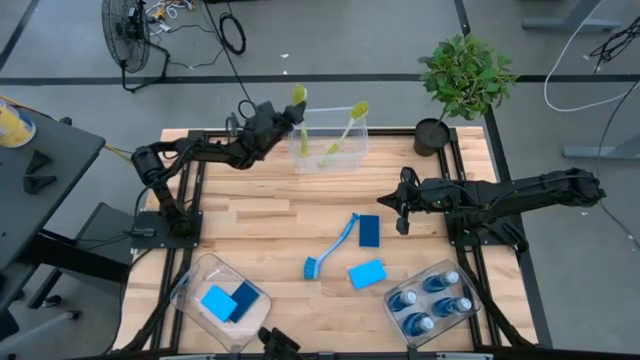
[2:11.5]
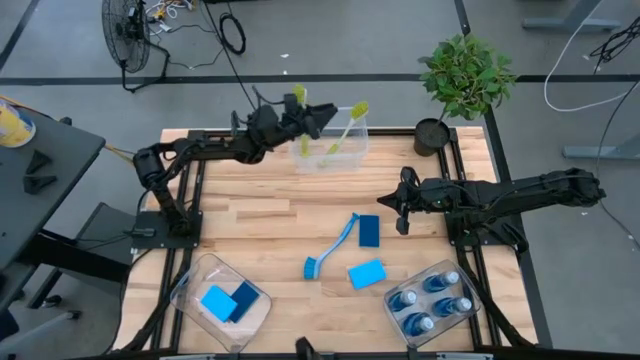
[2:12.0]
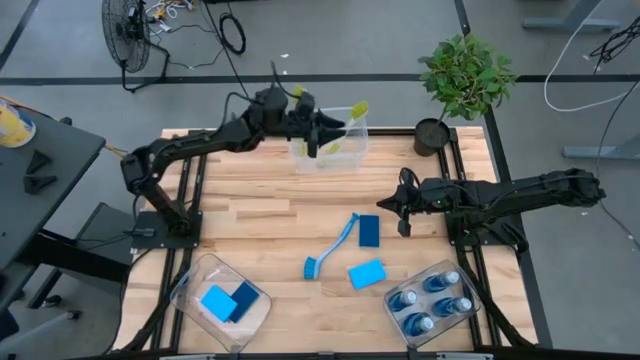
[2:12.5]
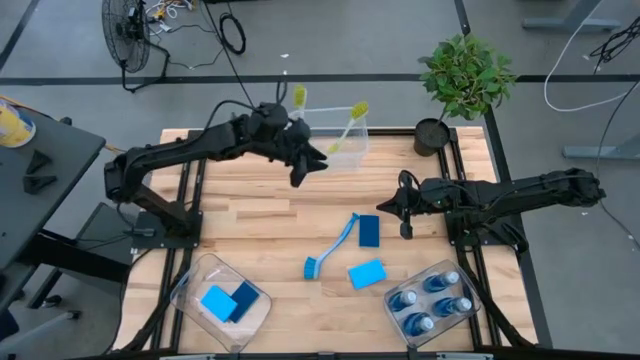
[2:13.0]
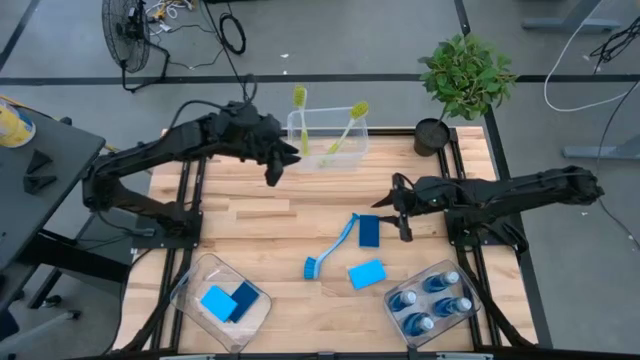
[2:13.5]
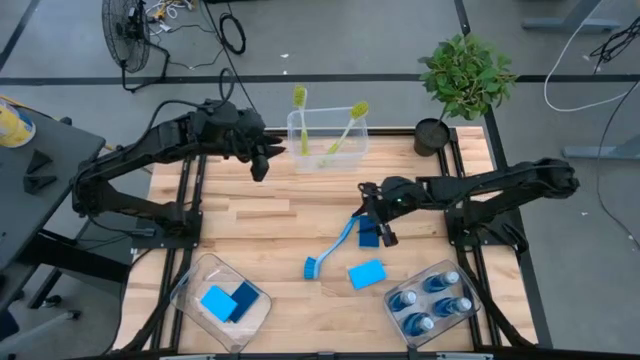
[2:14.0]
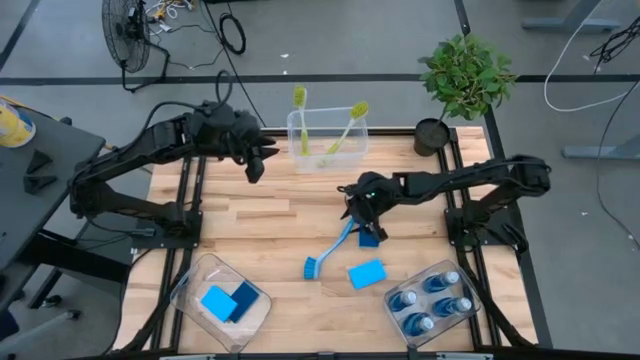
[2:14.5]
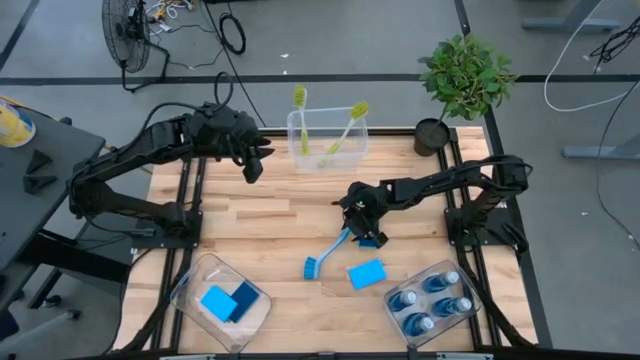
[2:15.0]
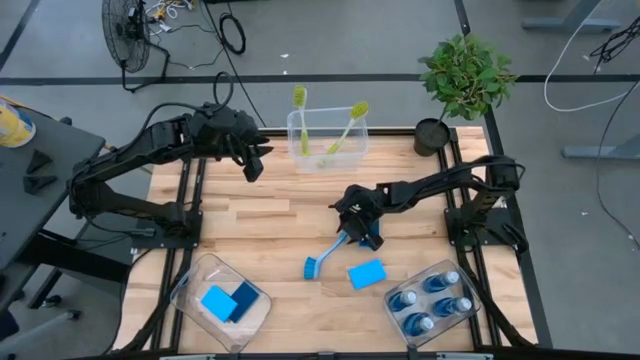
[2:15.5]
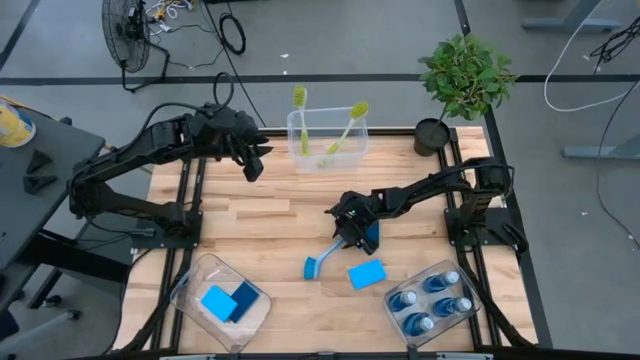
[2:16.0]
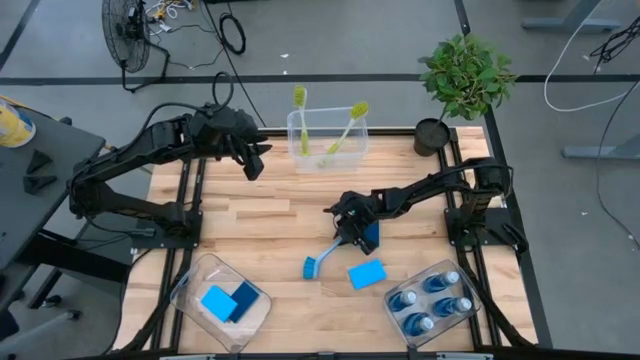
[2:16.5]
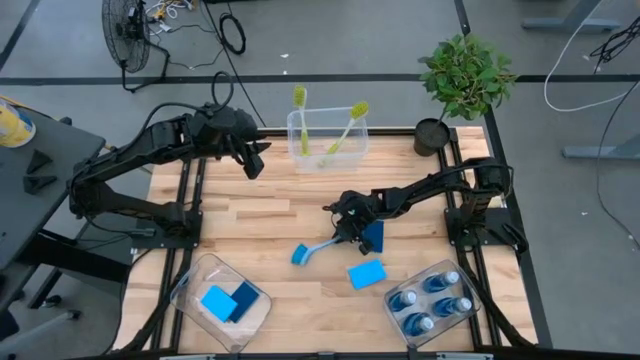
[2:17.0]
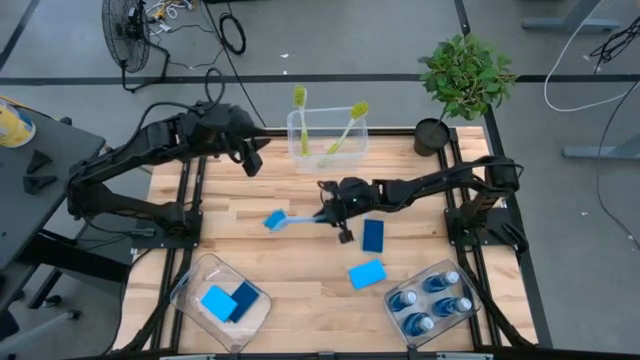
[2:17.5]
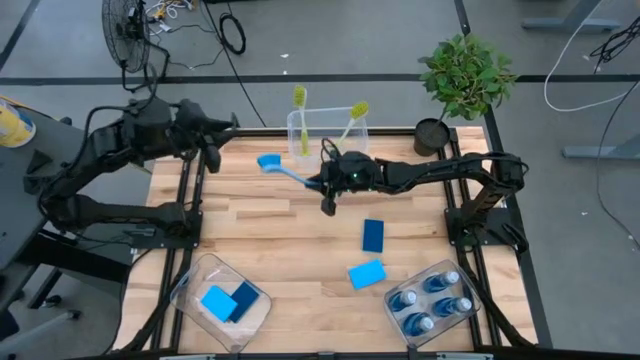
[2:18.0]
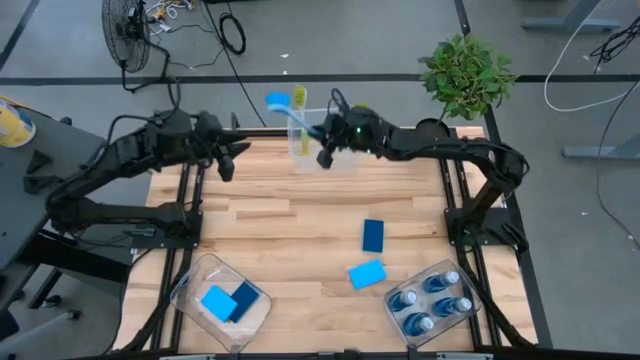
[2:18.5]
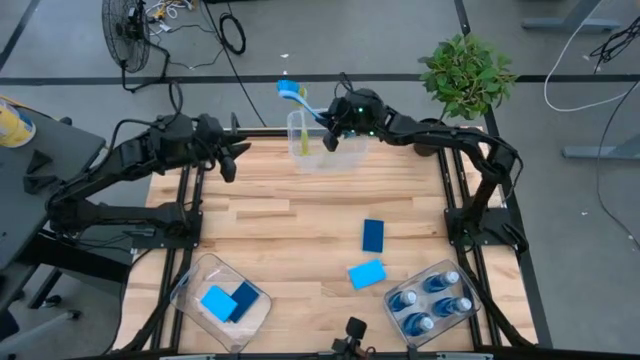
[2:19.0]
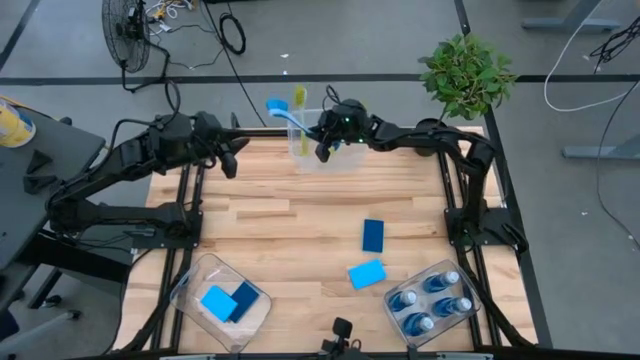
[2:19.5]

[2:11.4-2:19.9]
Task: Pick & Place Kitchen Sink Supplies
Put the blue dish brush into the top center transparent bin

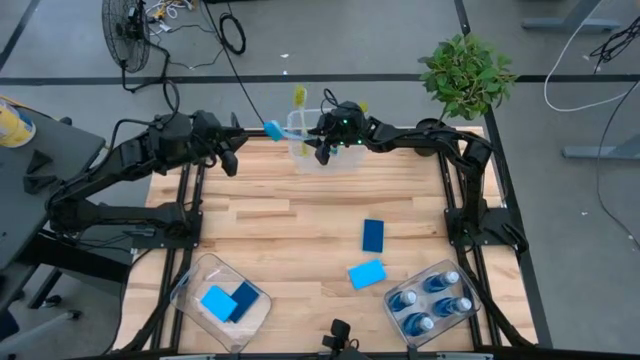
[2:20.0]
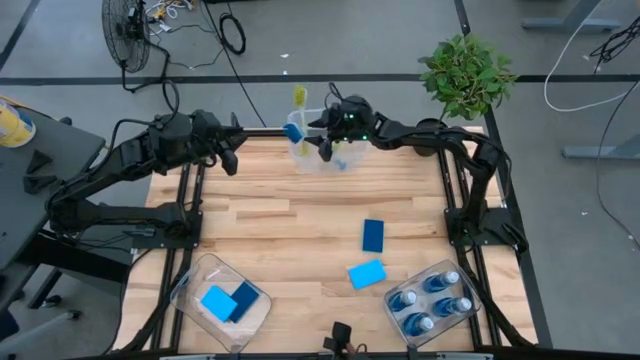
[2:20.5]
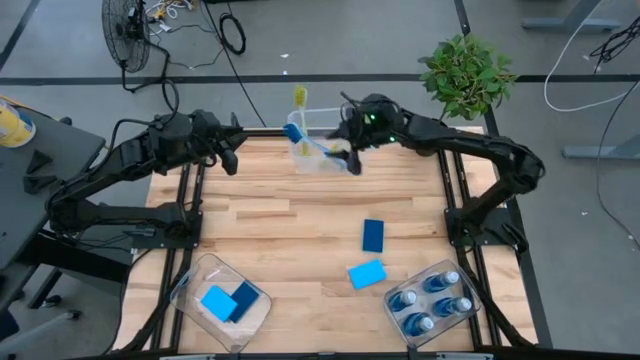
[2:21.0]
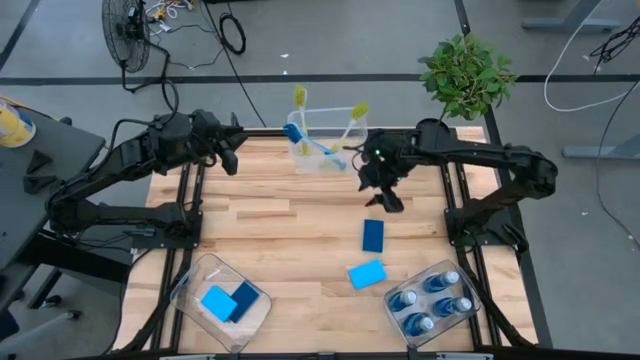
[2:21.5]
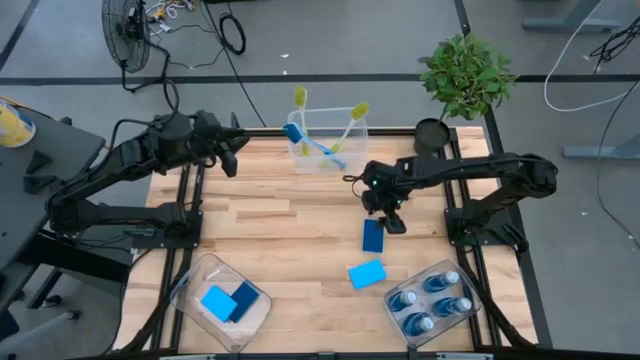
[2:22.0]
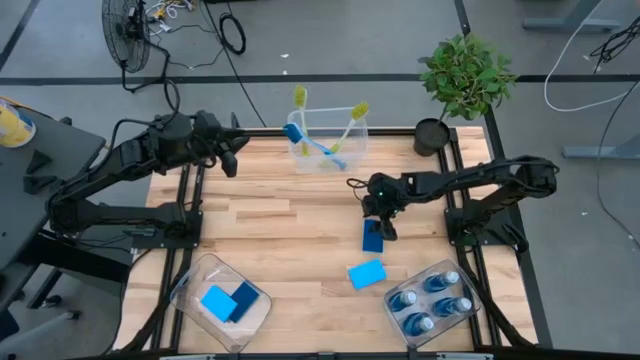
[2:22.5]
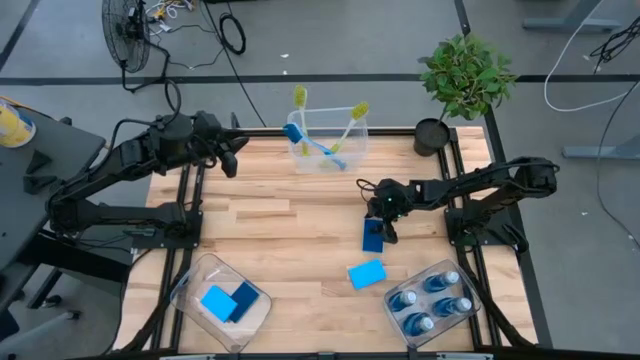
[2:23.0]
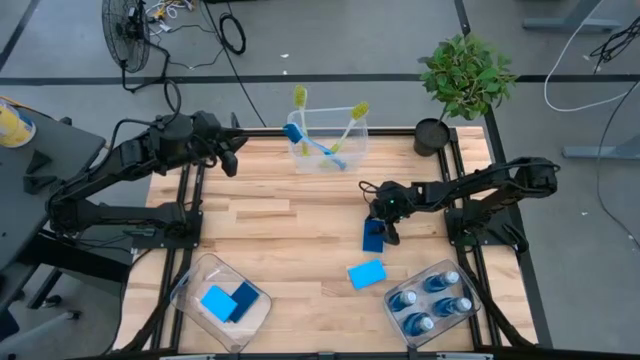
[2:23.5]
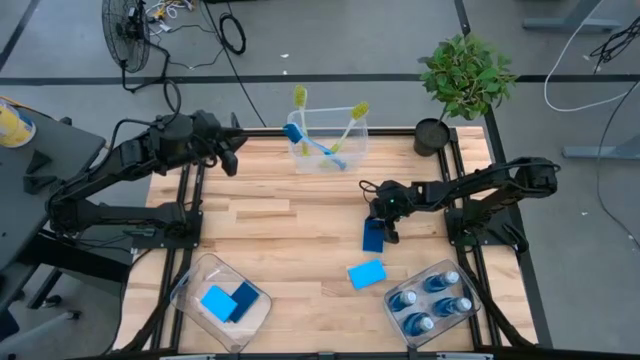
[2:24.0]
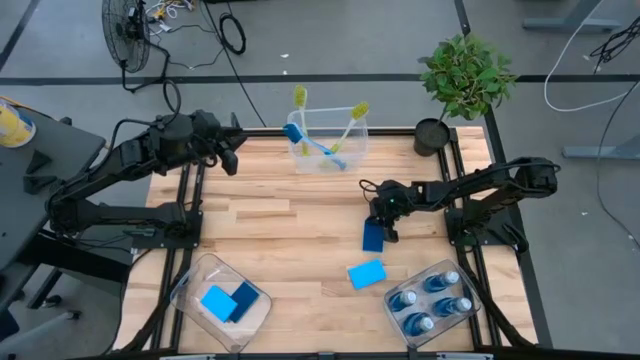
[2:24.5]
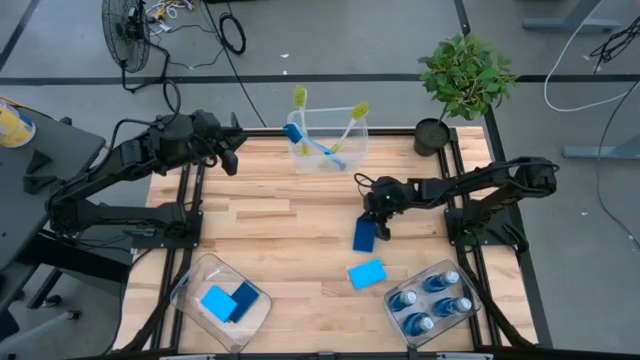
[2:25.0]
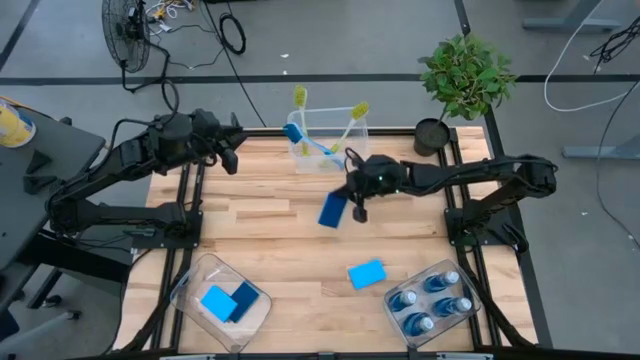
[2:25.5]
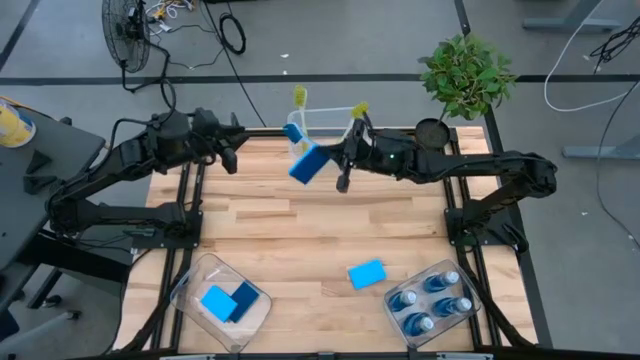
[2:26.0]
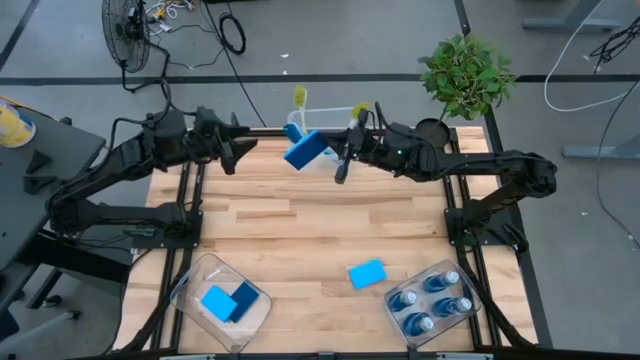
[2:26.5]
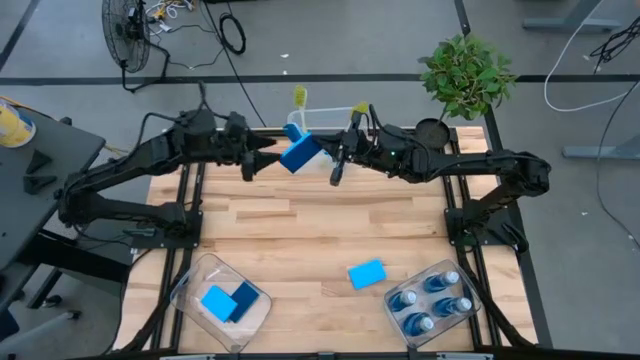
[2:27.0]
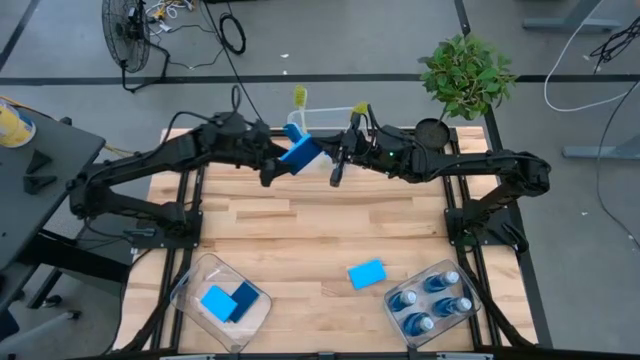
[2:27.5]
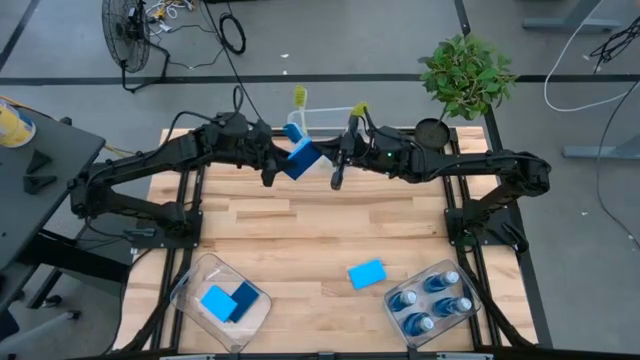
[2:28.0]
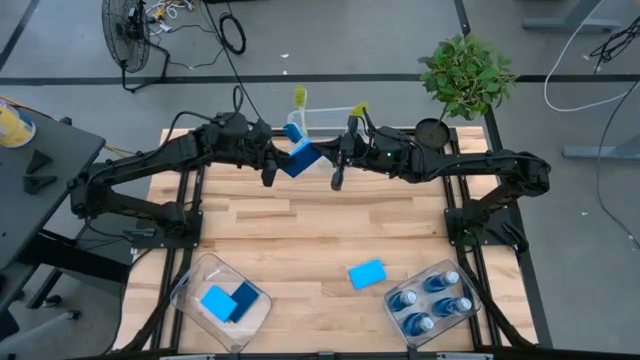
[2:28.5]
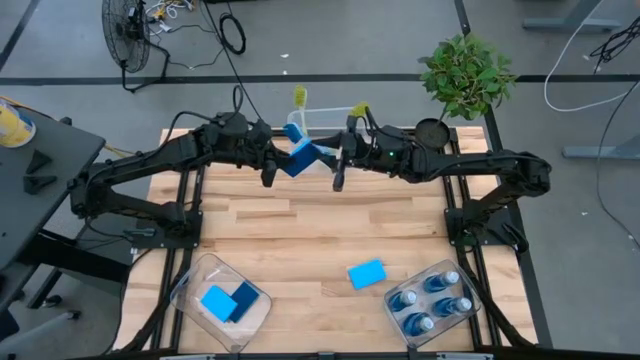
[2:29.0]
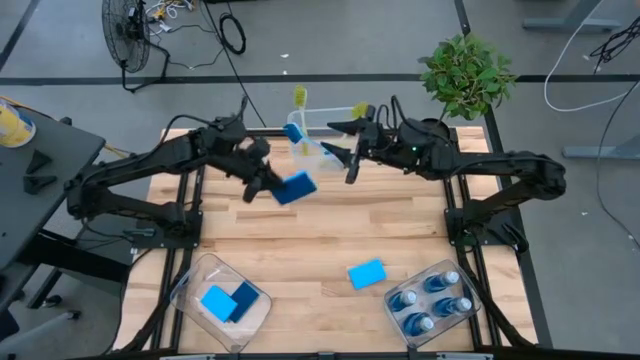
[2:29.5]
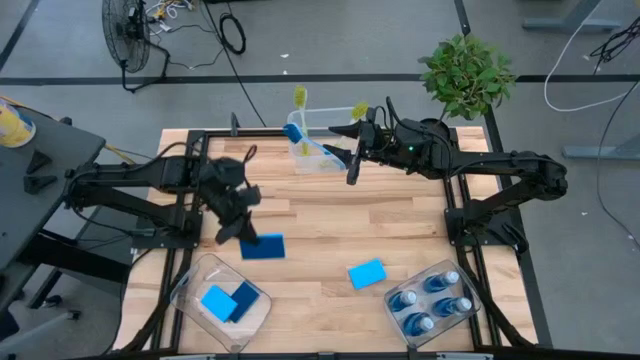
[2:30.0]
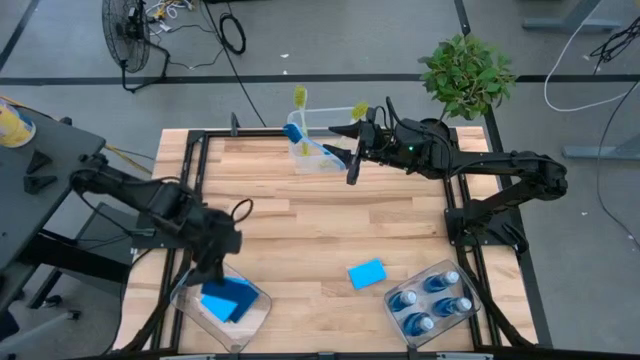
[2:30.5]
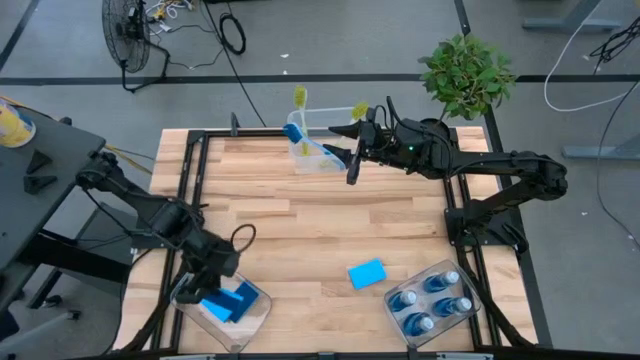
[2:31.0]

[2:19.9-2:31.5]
Put the blue sponge into the bottom left transparent bin
